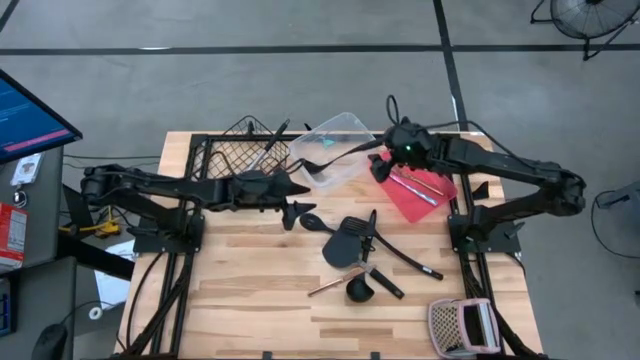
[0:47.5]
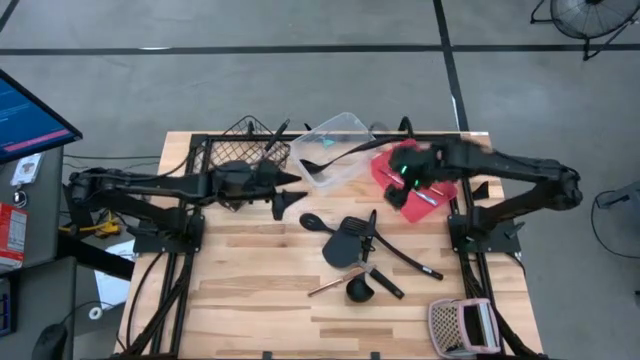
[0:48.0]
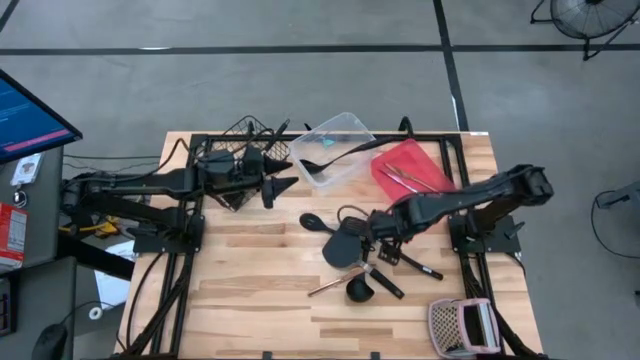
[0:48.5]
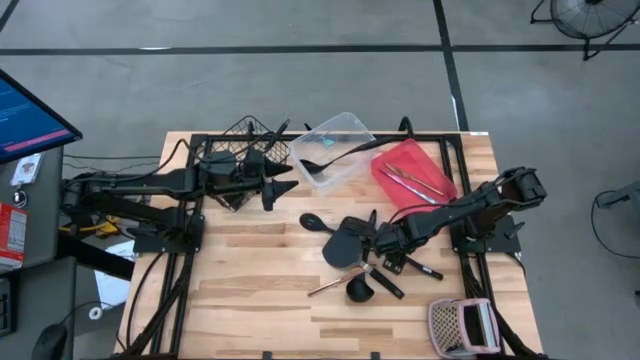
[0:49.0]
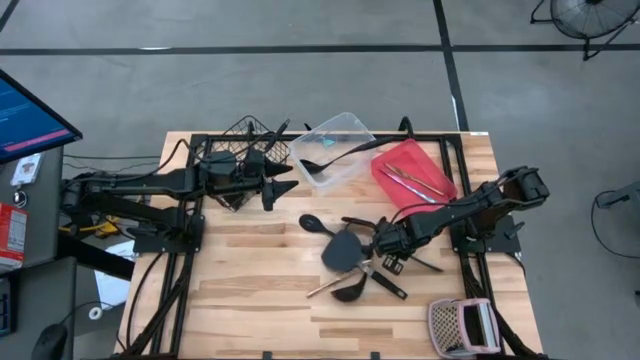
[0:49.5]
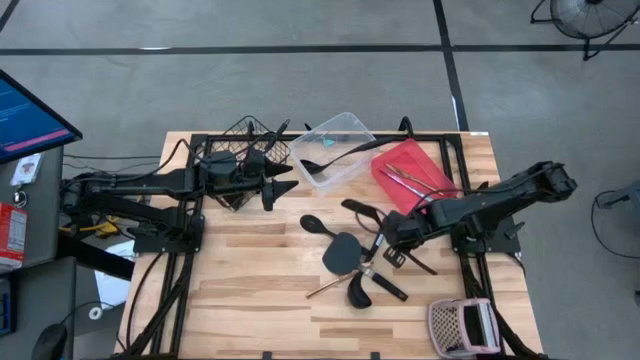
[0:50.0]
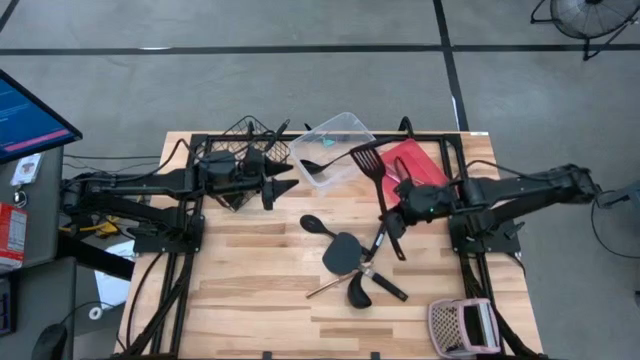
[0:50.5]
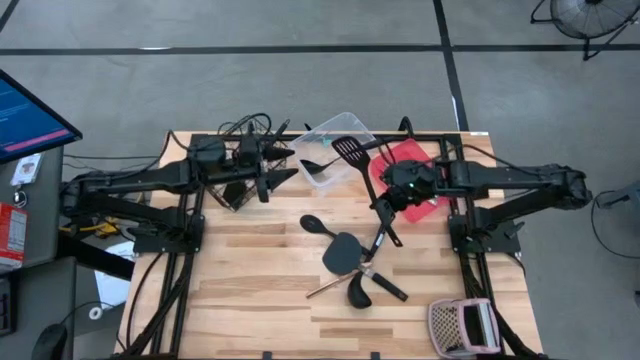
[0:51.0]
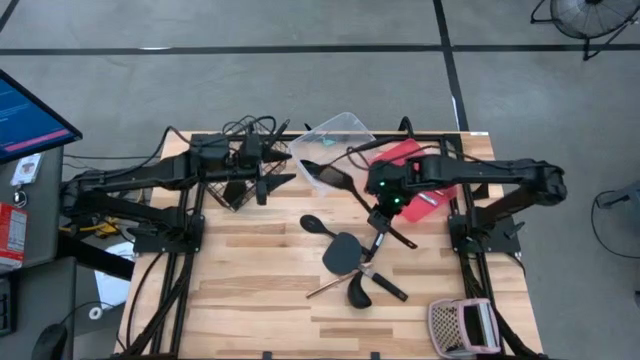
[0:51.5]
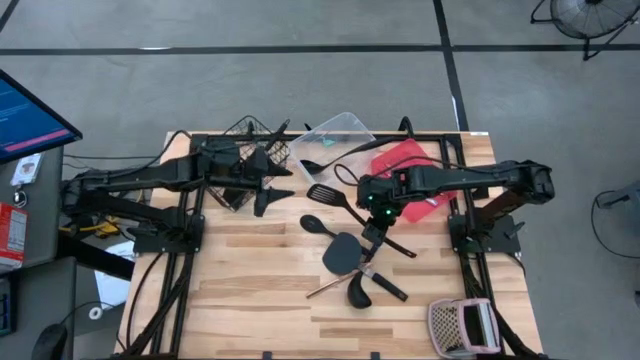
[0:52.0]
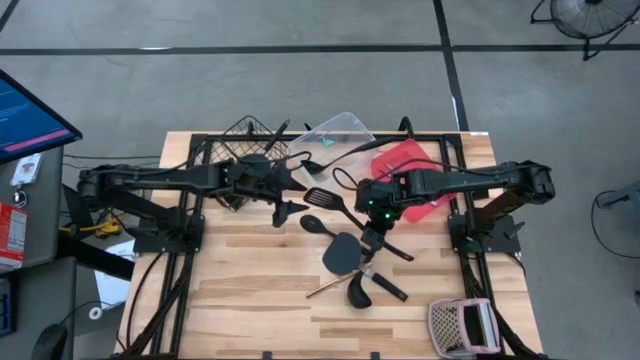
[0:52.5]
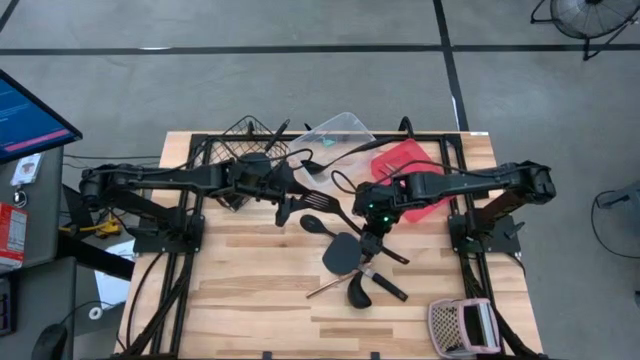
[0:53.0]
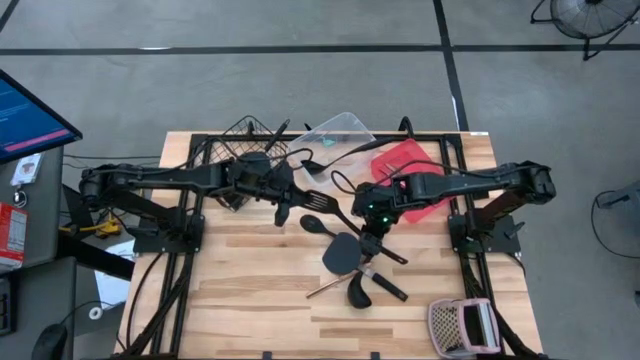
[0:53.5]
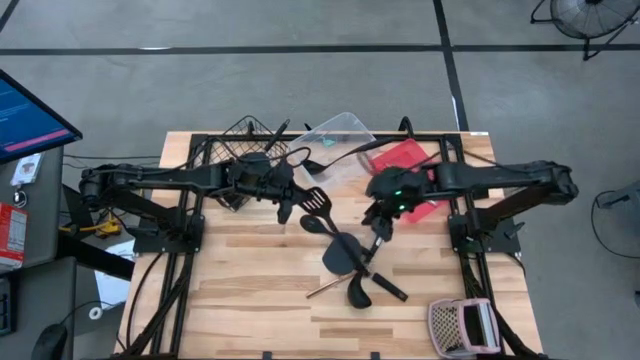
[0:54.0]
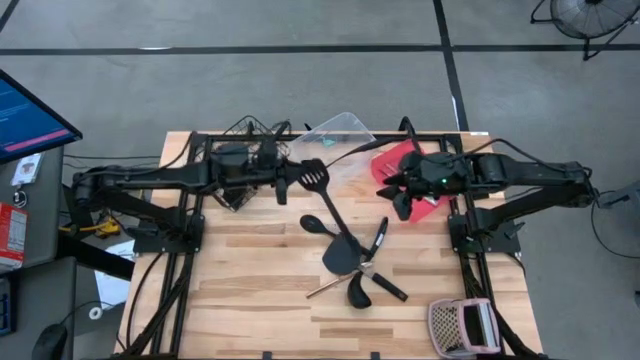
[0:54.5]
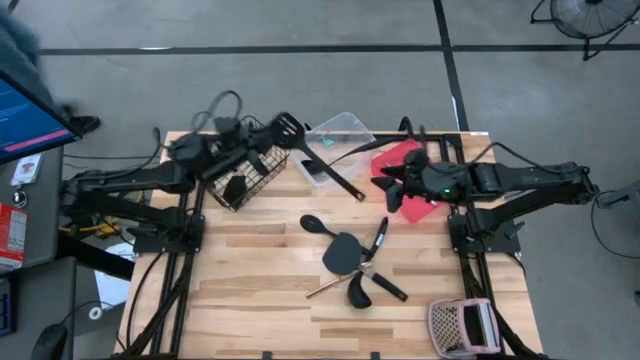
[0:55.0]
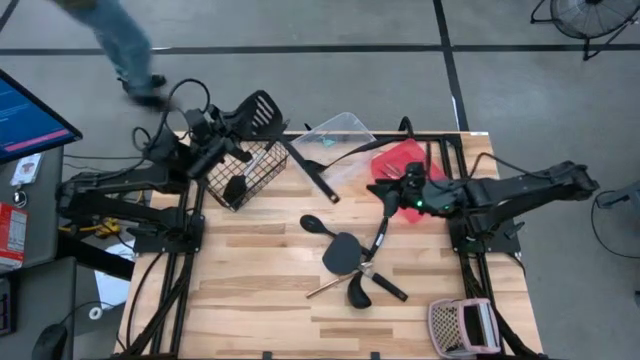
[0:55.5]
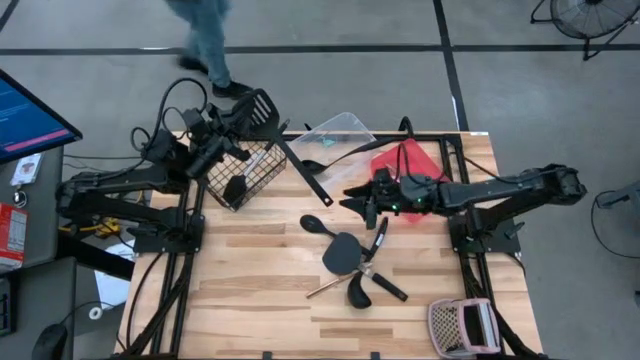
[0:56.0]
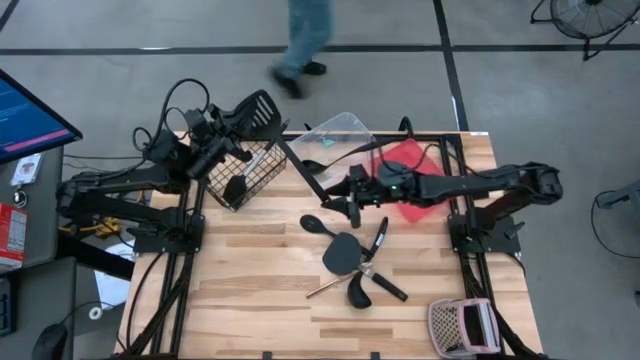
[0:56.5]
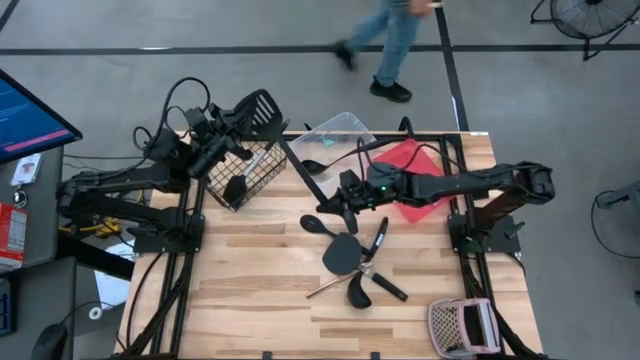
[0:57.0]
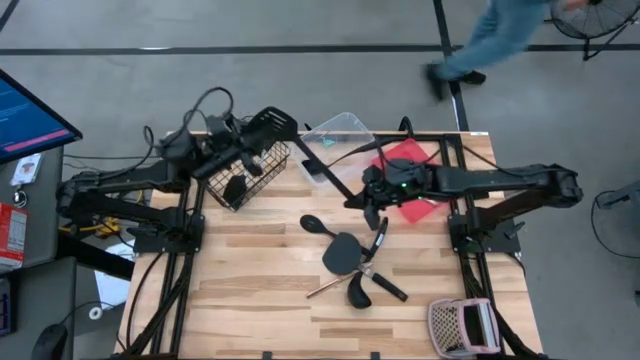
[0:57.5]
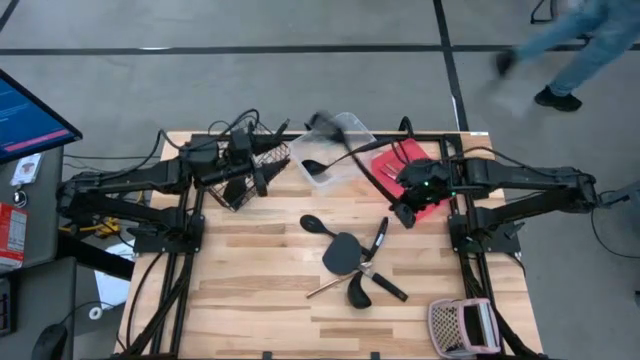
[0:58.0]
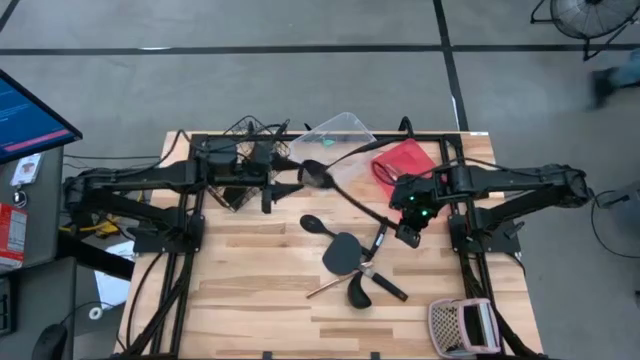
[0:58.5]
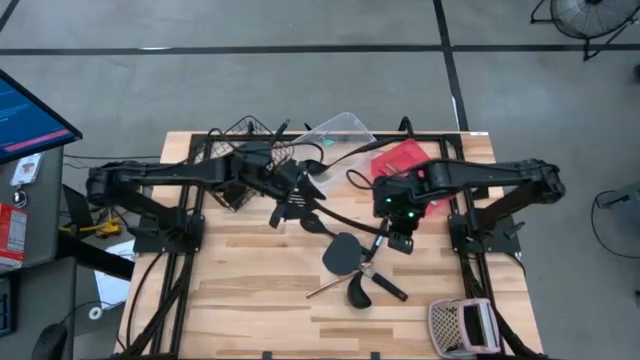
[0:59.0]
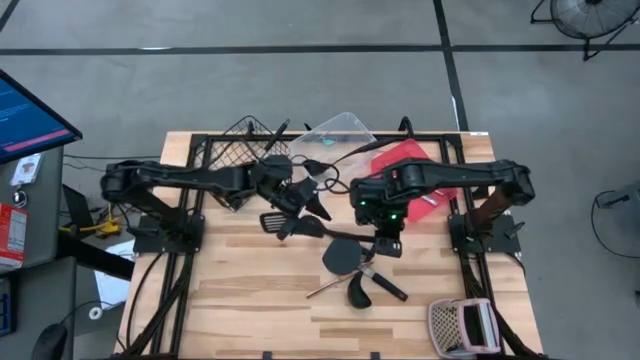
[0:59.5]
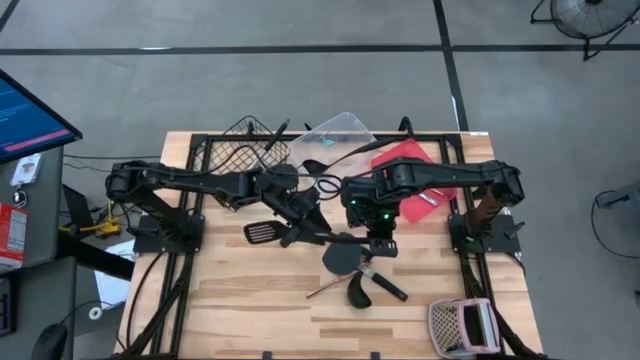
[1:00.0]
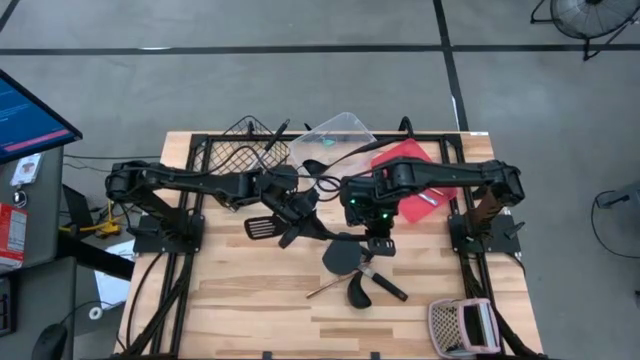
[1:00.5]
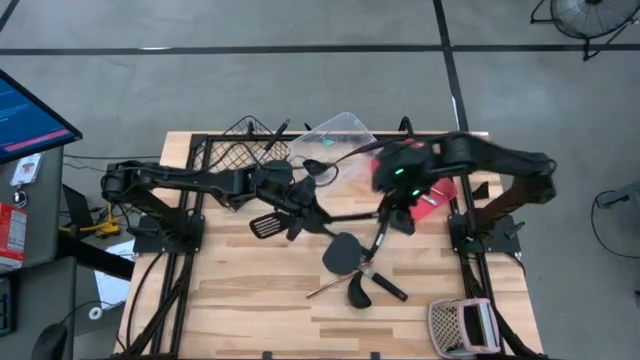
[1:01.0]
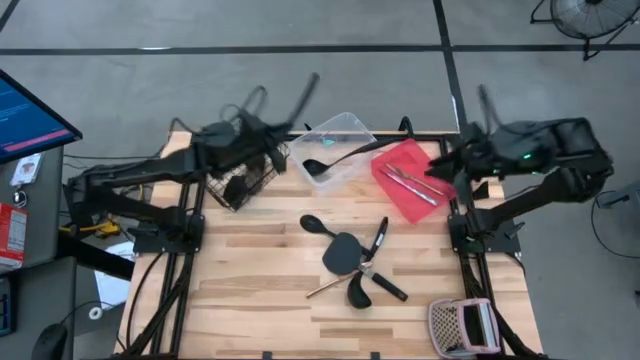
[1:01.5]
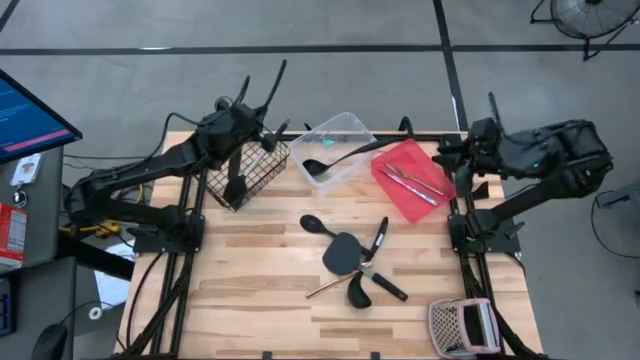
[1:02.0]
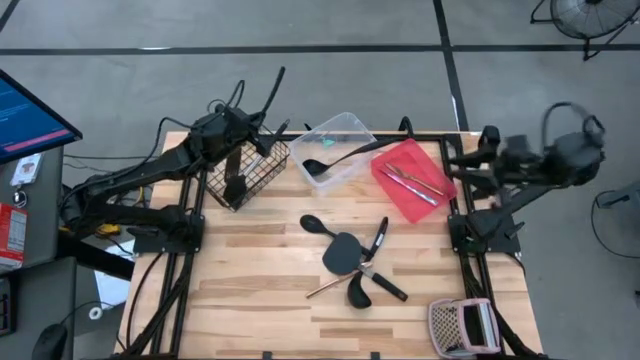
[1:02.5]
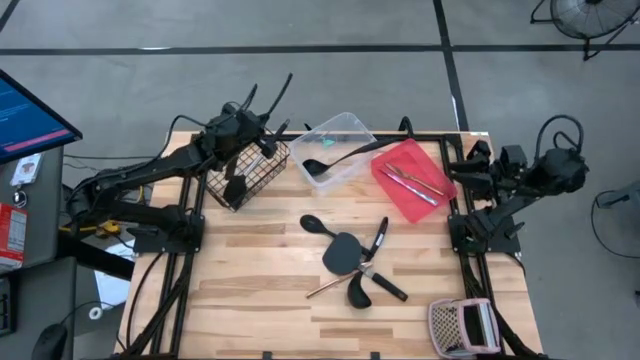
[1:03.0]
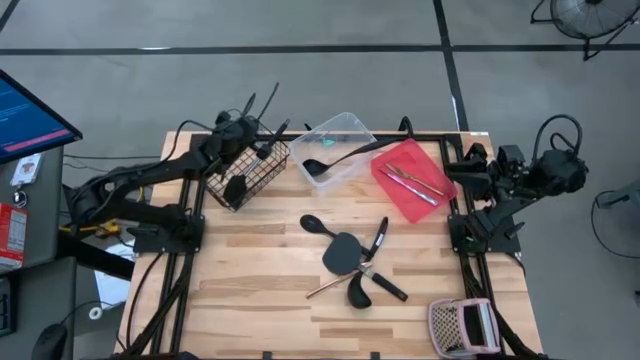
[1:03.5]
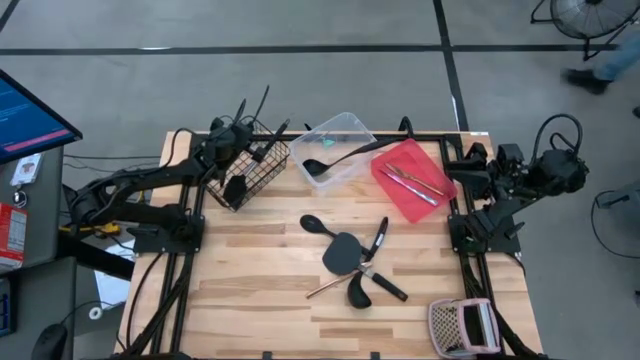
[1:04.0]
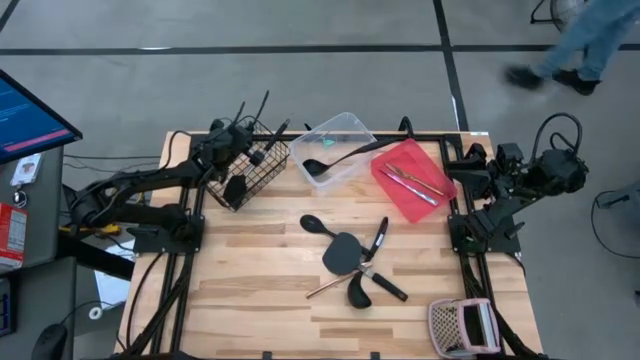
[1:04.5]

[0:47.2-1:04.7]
Task: Pick & Place Kitchen Items
Put the top spatula into the wire basket

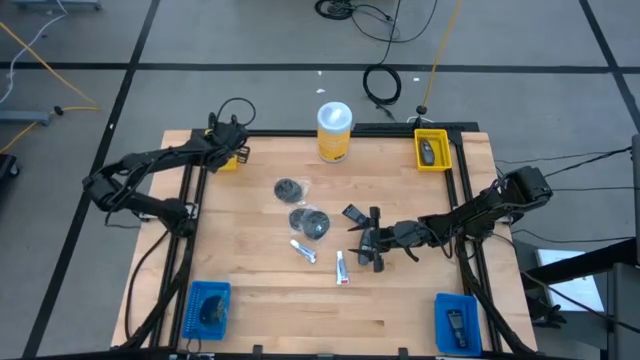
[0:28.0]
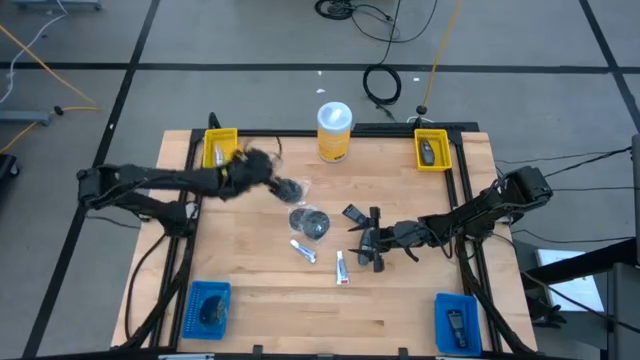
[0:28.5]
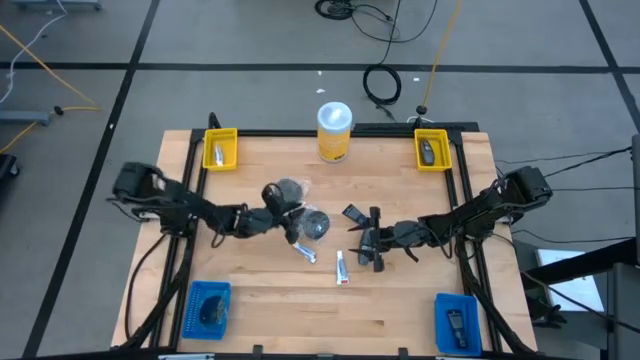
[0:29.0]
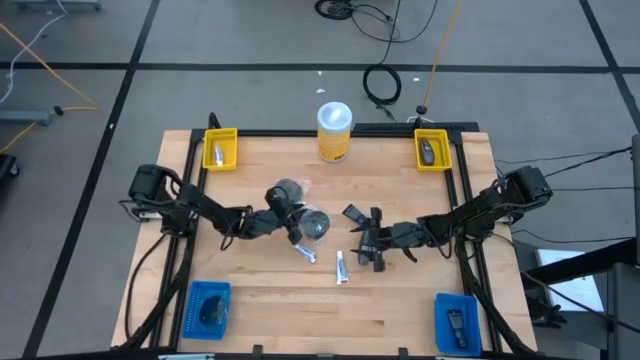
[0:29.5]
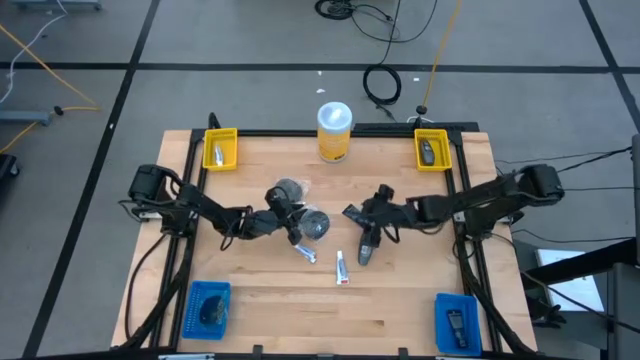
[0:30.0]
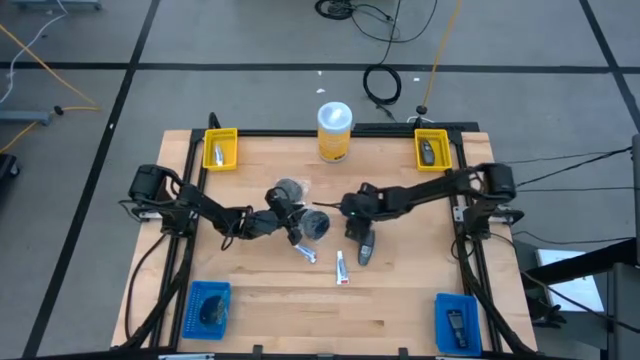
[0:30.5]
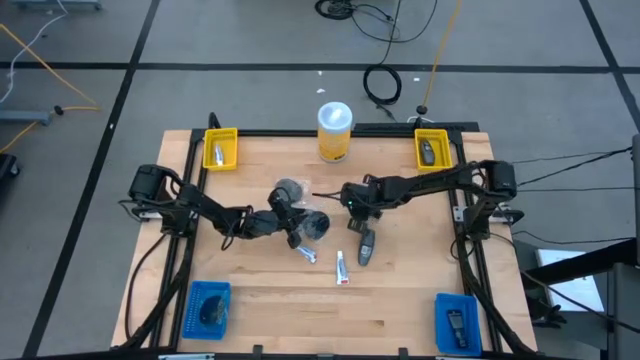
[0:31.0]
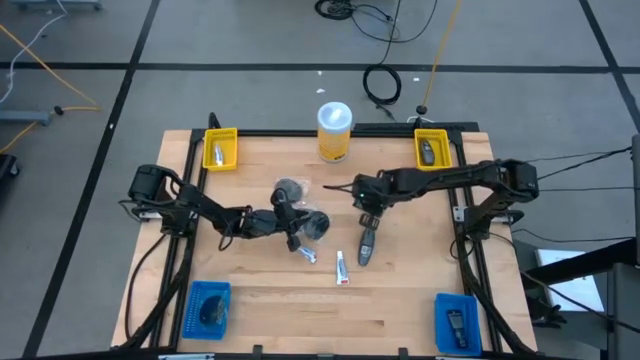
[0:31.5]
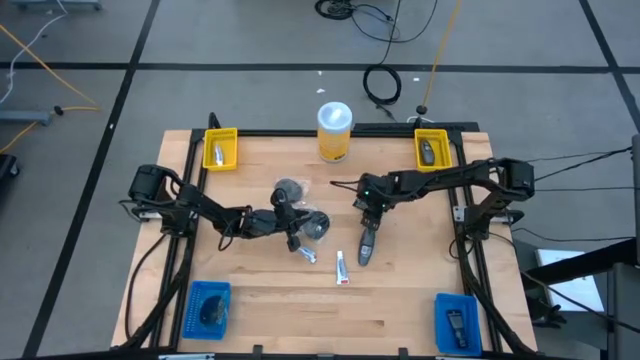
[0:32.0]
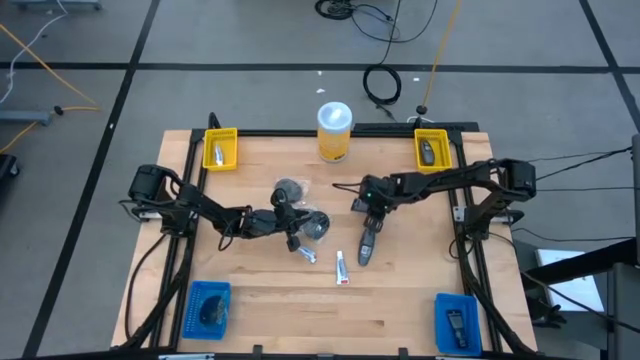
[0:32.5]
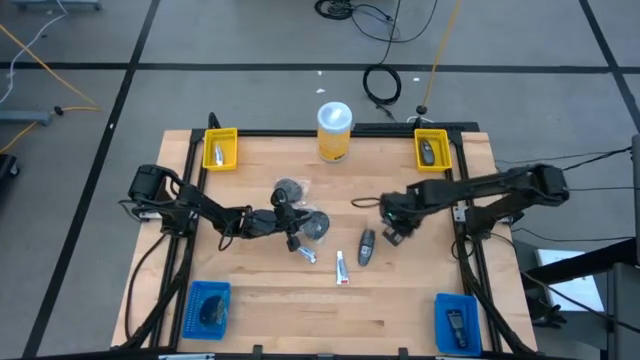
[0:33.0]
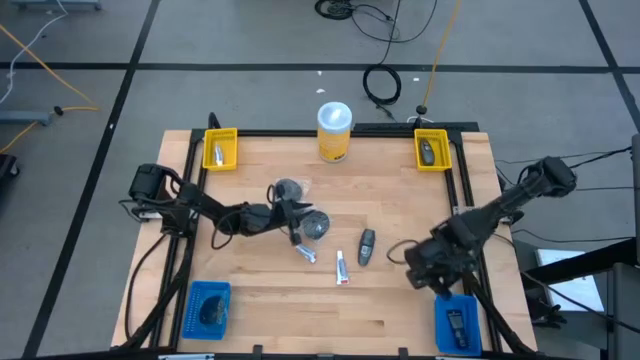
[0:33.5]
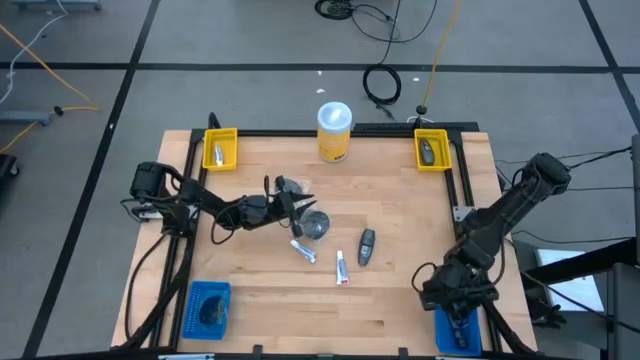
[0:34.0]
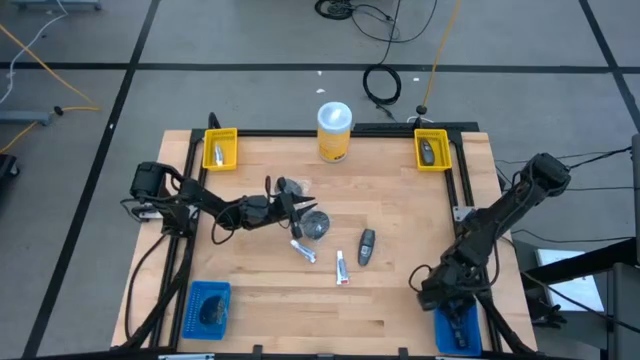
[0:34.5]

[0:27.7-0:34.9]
Task: Pick & Place Travel size toiletries
Put the blue shave cream into the bottom right blue bin
